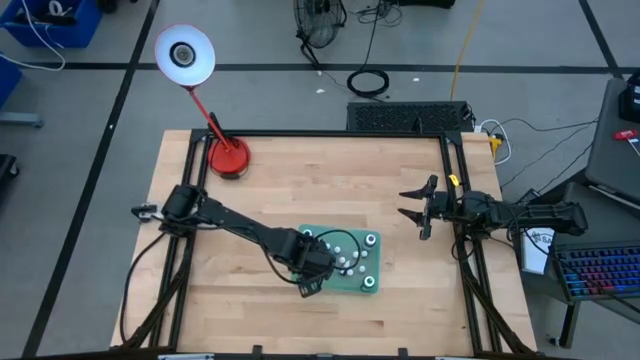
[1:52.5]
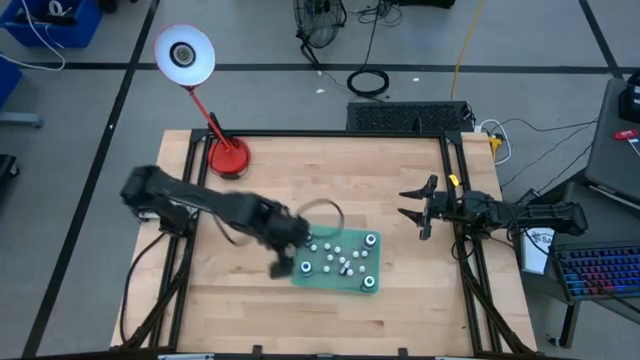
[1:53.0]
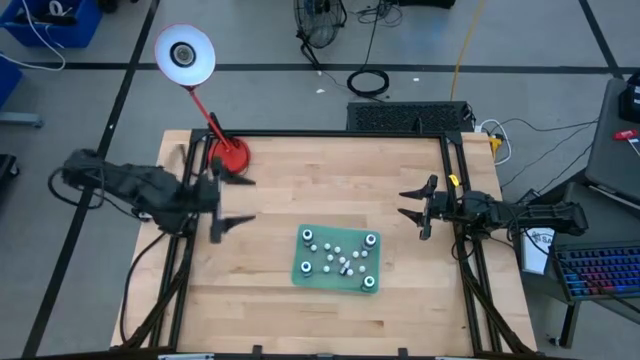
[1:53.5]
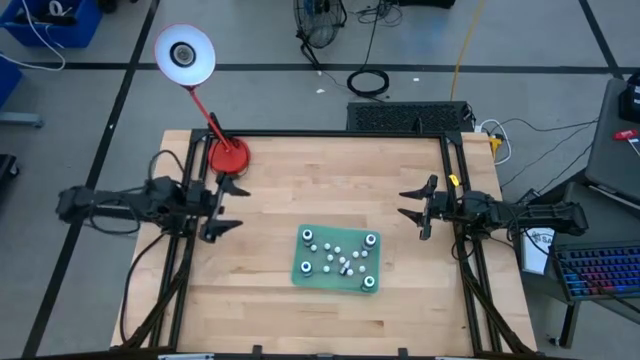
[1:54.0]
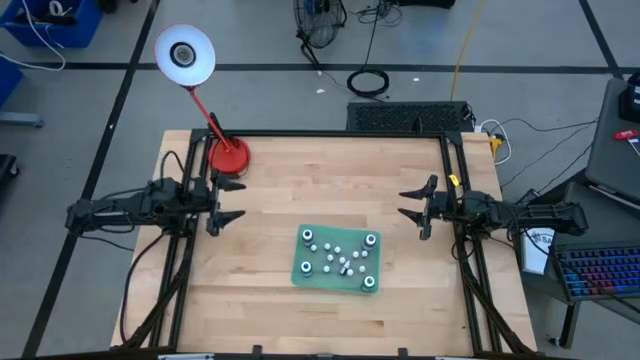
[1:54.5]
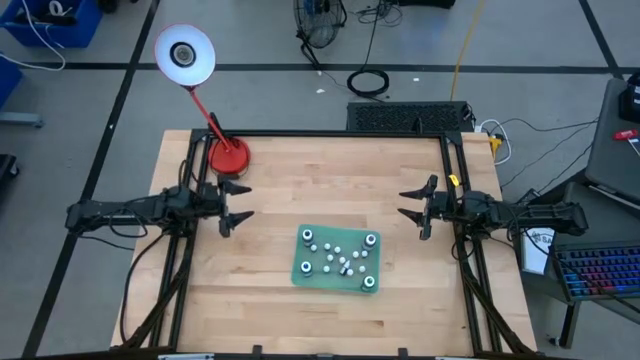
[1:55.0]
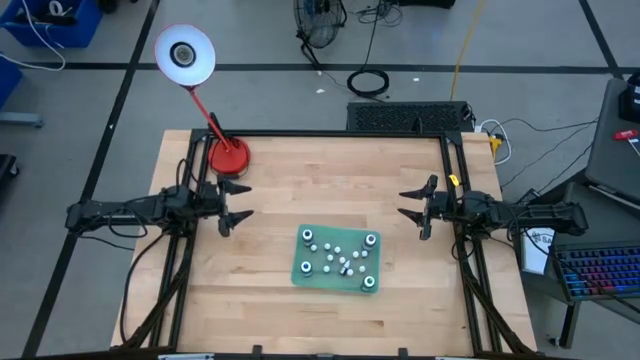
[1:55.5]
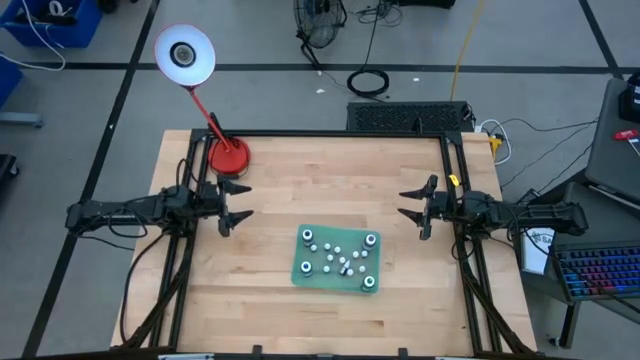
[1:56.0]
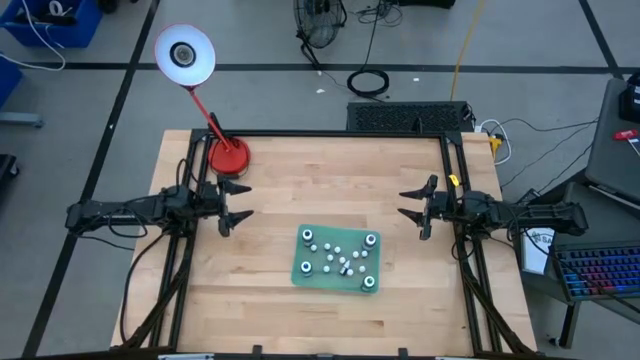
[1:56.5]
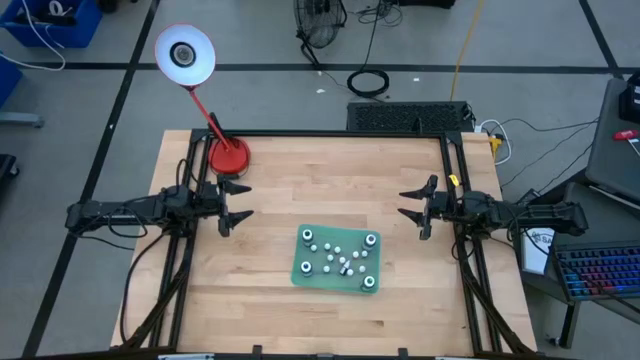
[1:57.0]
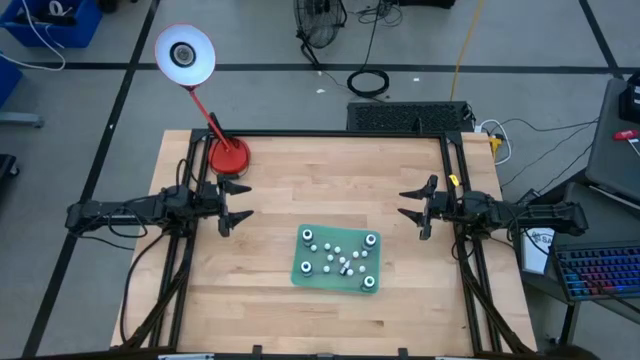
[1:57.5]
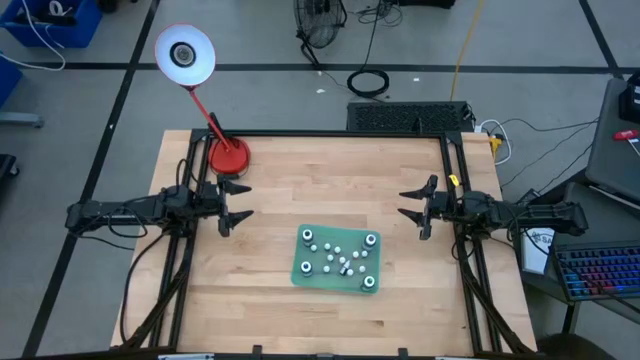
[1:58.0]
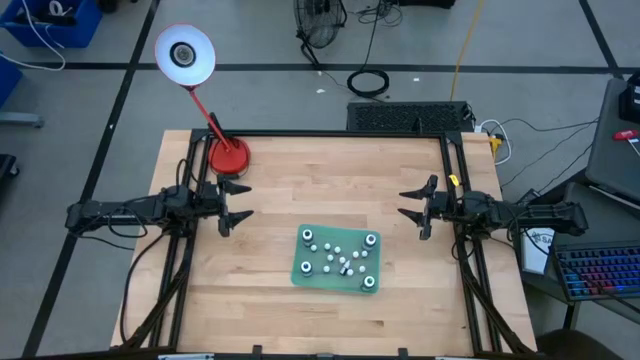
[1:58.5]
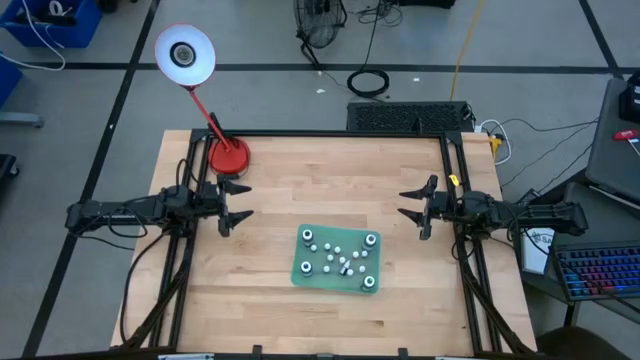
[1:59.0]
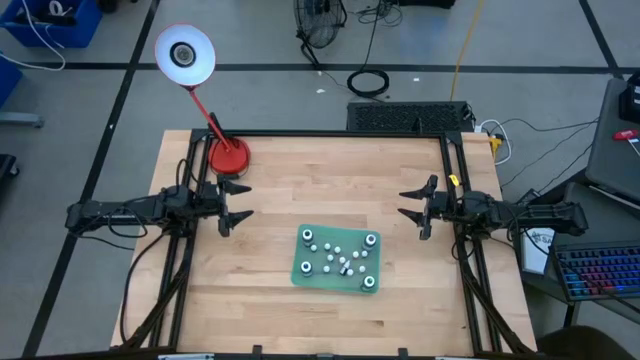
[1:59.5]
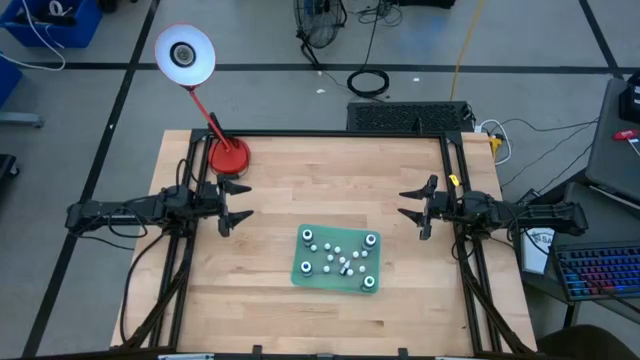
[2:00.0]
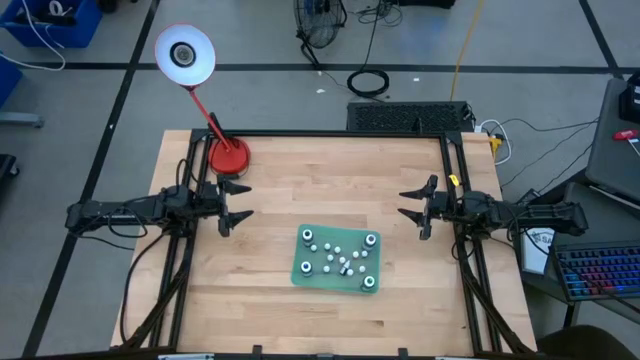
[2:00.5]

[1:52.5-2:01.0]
Task: Pick & Place food coloring
Return to Home Position

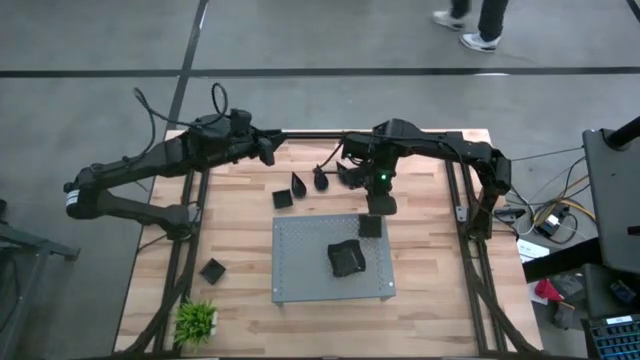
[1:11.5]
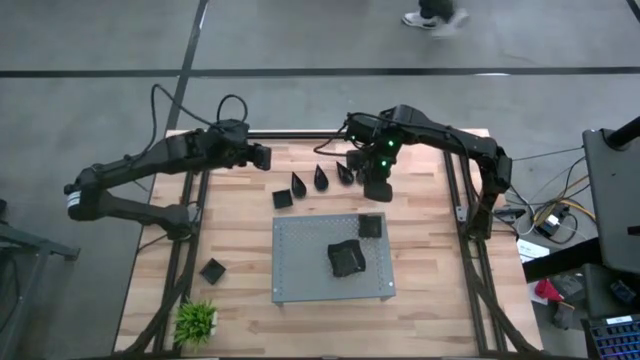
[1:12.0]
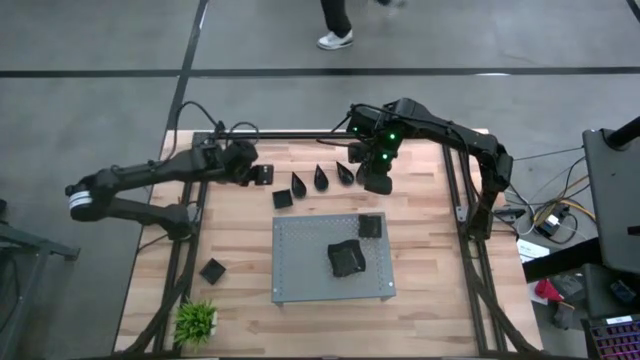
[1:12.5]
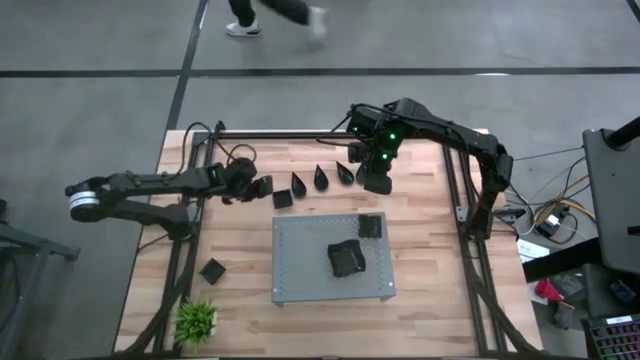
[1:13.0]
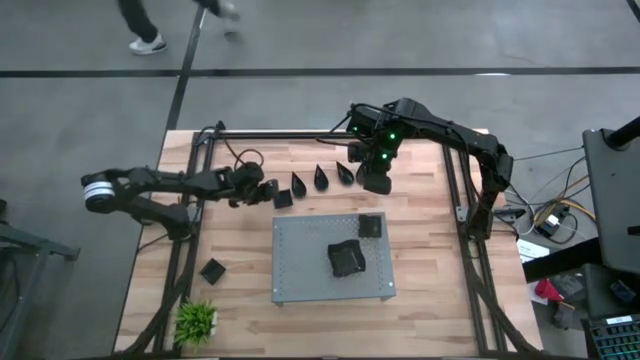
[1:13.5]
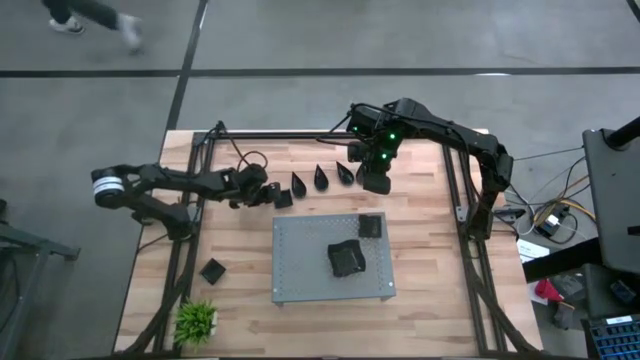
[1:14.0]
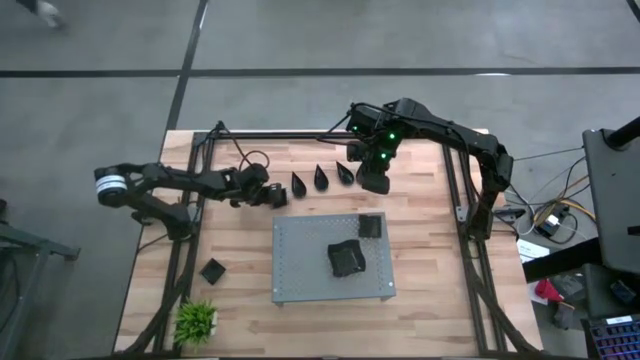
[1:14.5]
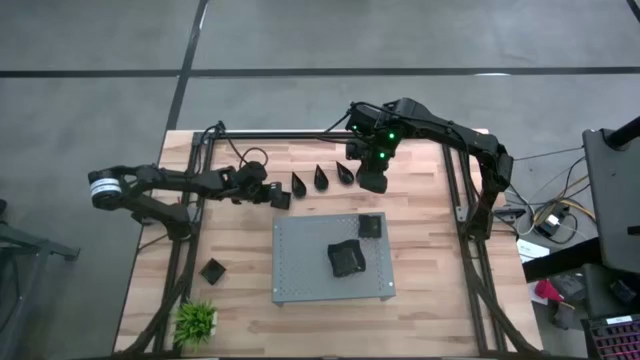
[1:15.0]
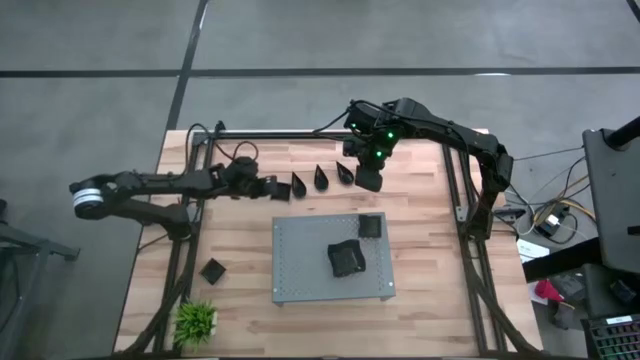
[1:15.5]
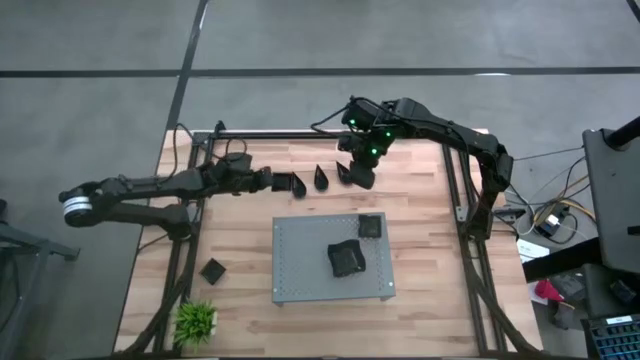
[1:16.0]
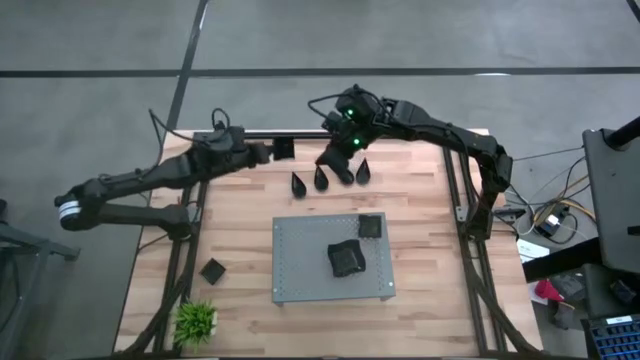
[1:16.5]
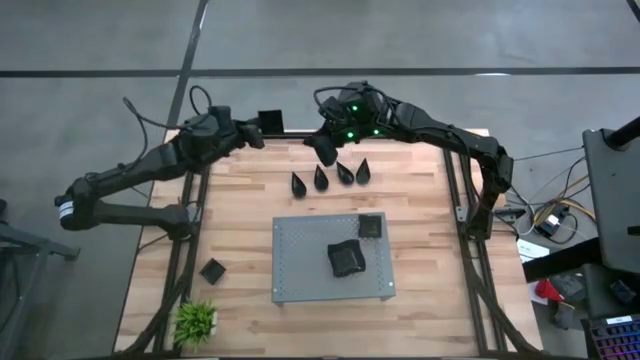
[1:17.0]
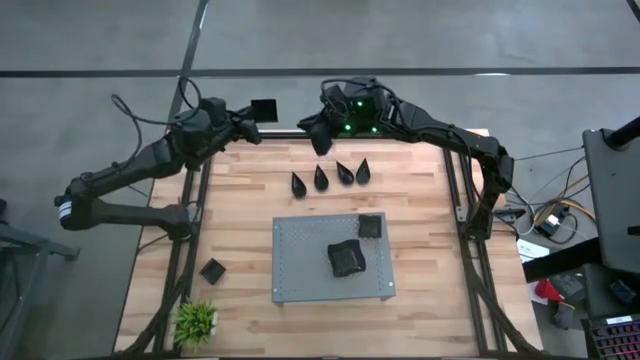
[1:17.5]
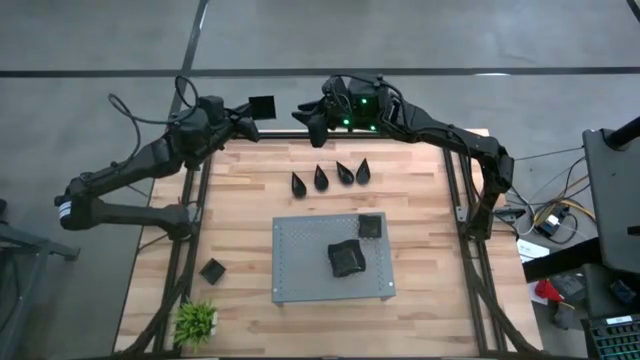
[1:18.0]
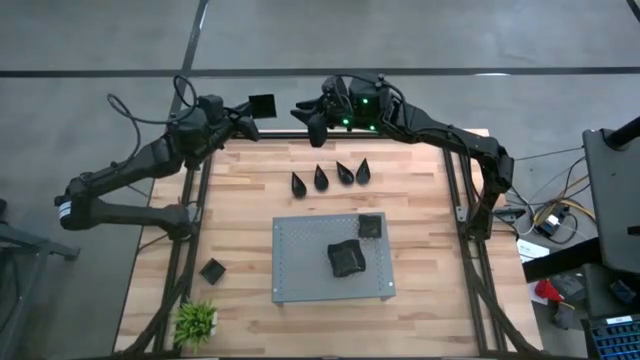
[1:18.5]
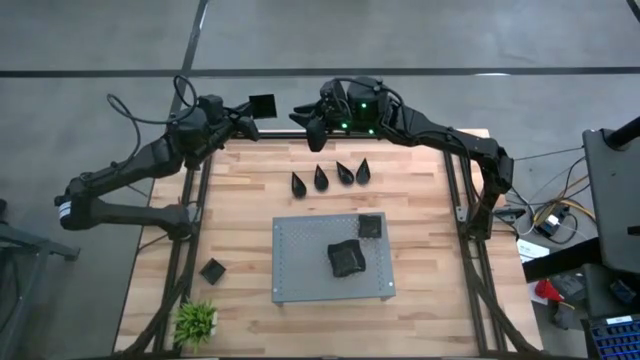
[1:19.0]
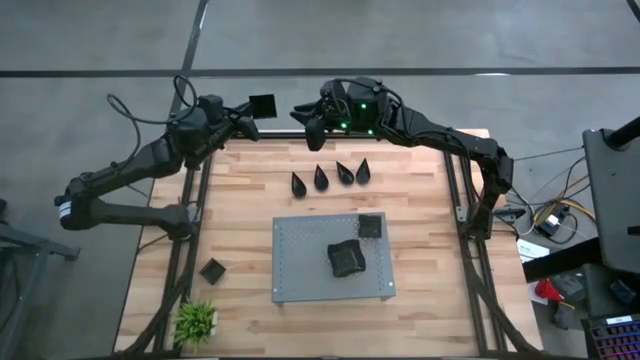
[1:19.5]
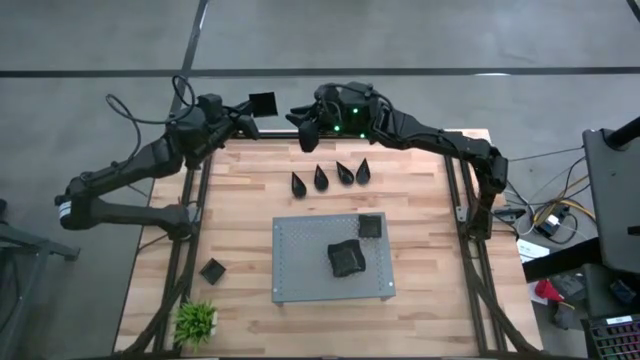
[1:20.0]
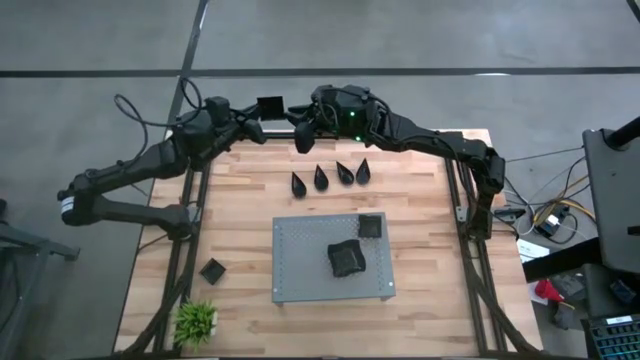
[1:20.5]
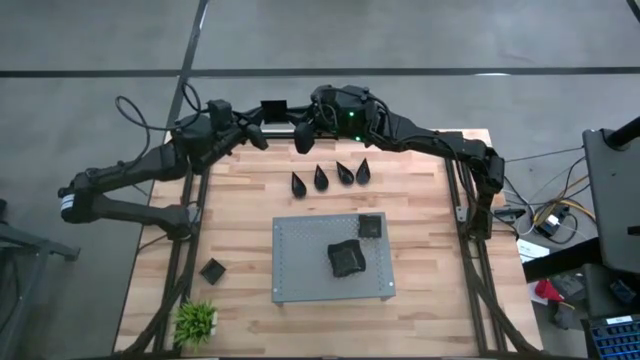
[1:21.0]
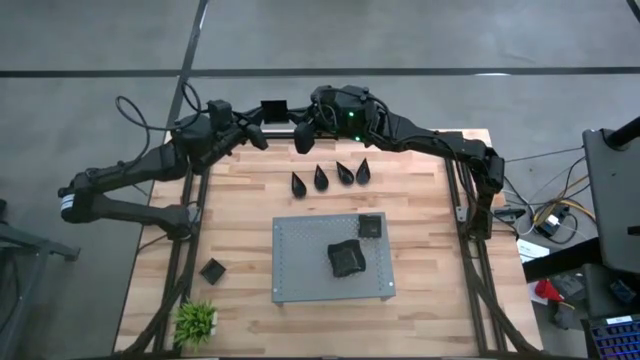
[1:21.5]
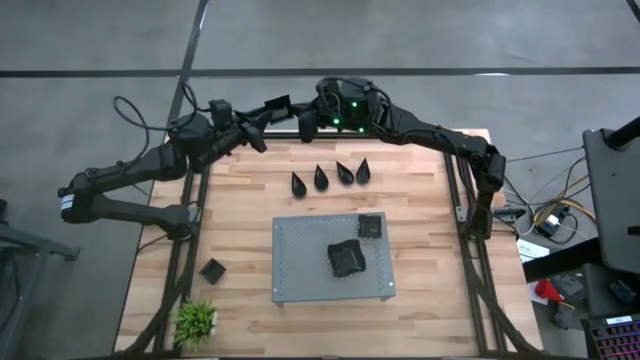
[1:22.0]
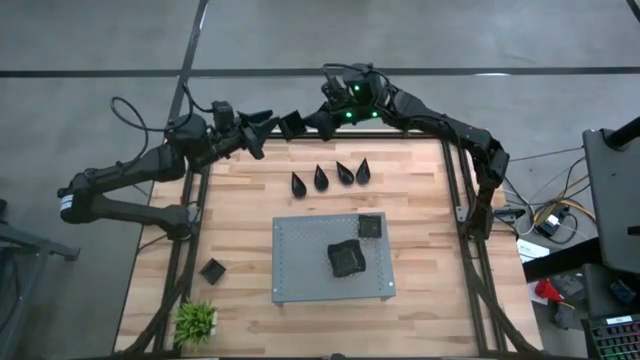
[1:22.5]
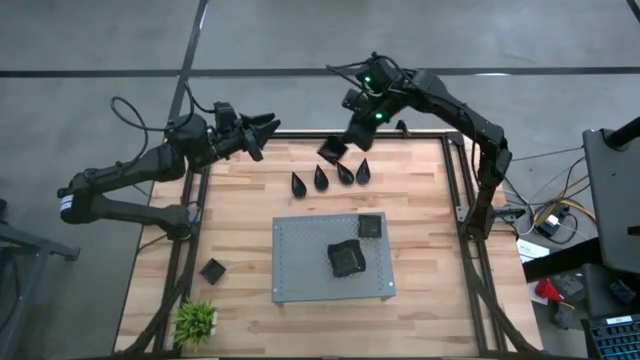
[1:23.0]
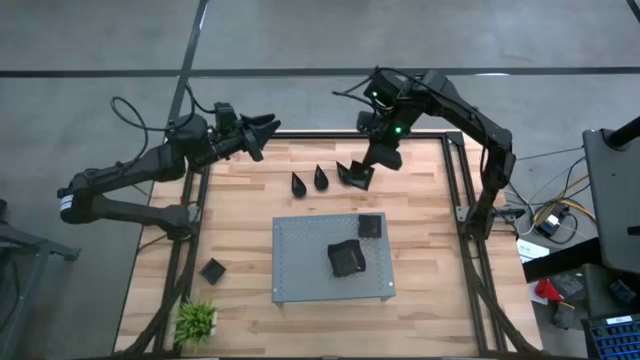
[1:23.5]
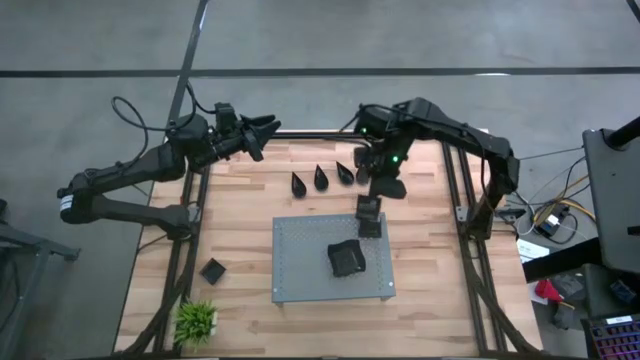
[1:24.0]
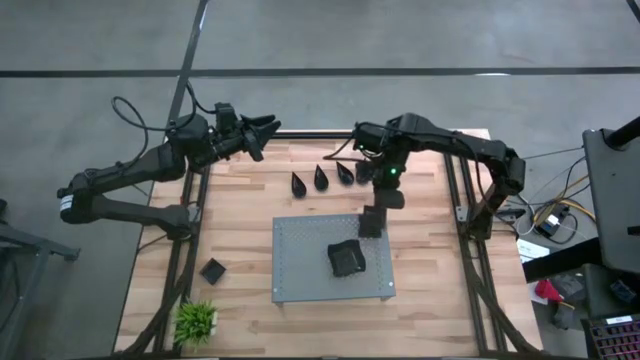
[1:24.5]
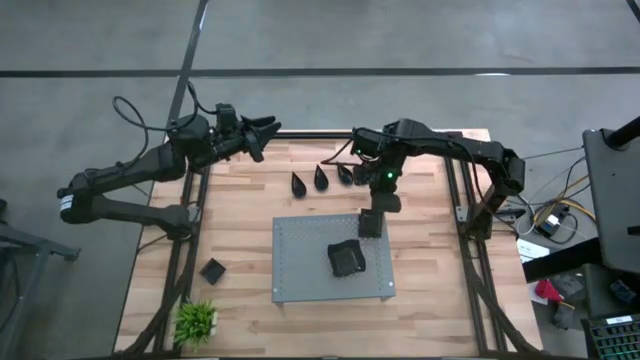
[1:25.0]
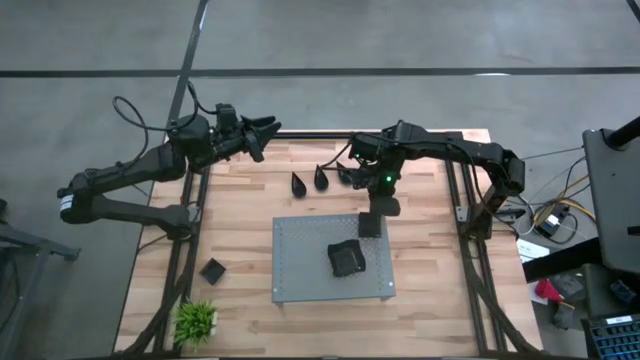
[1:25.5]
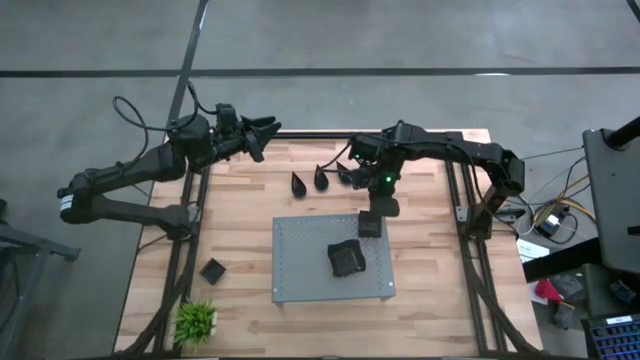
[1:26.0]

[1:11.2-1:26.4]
Task: Pick & Place Mini shaped plates
Stack the square plate on top of the other square plates on the shelf
